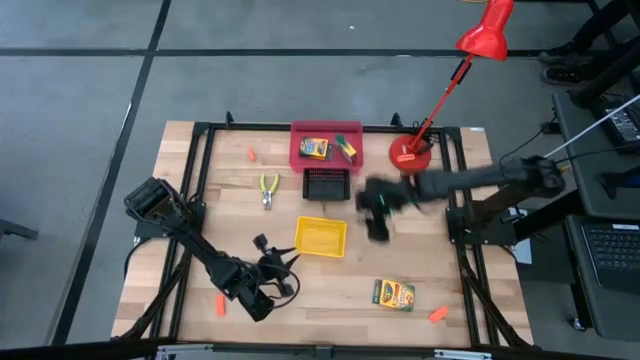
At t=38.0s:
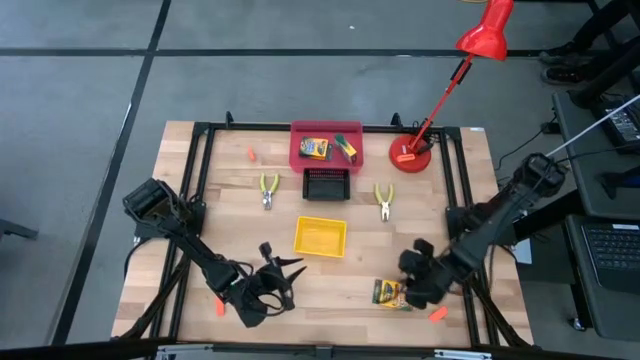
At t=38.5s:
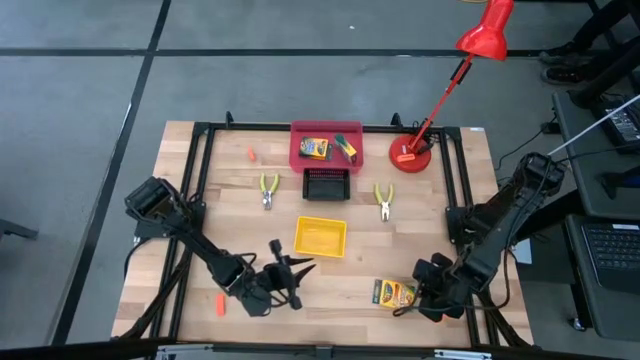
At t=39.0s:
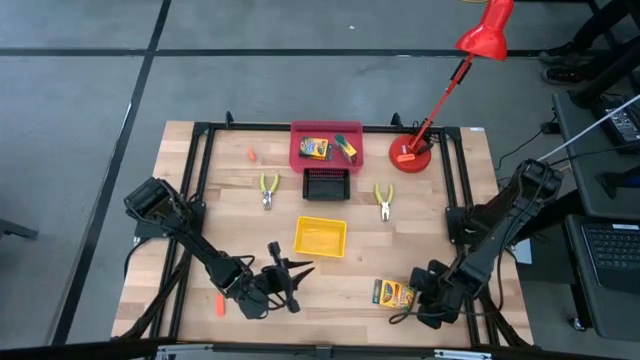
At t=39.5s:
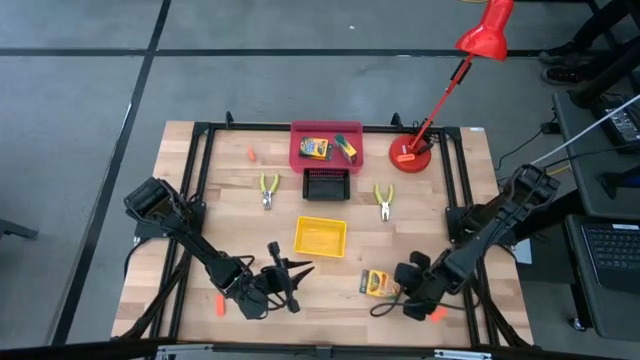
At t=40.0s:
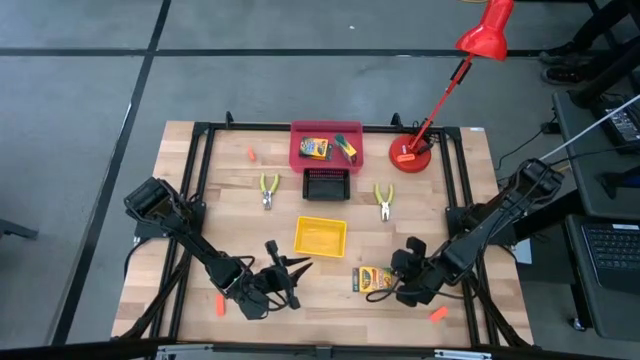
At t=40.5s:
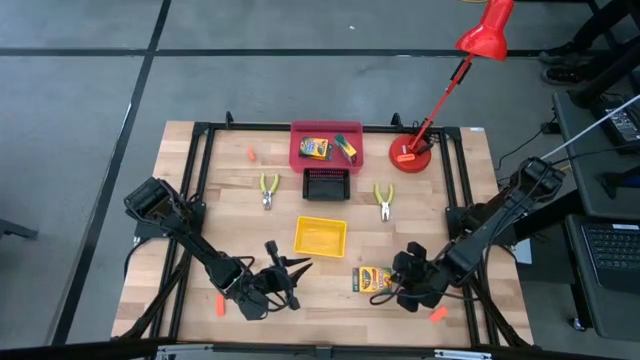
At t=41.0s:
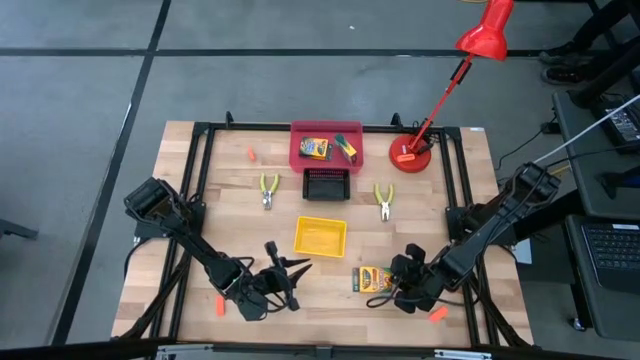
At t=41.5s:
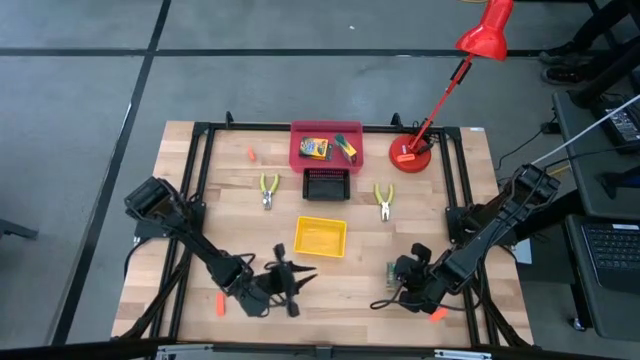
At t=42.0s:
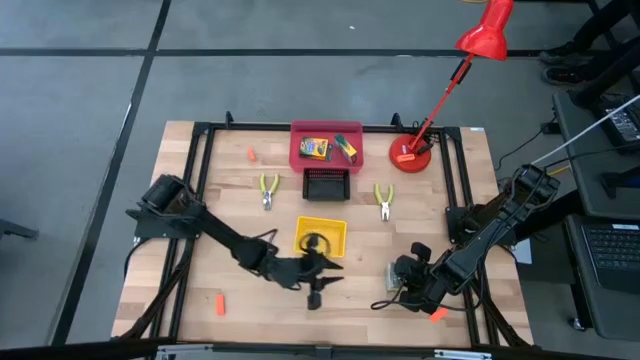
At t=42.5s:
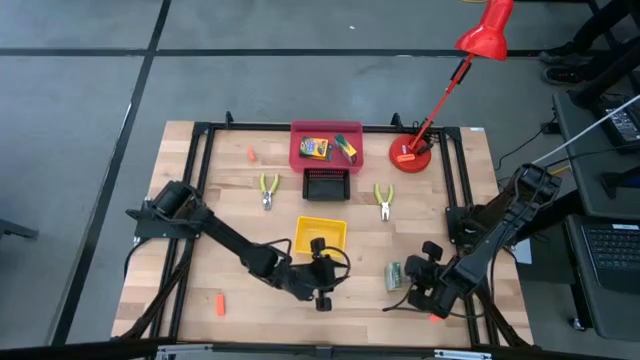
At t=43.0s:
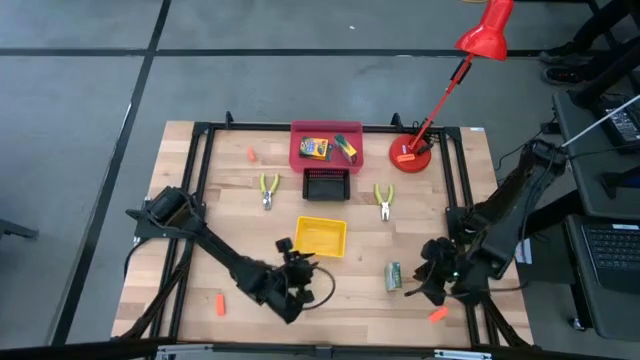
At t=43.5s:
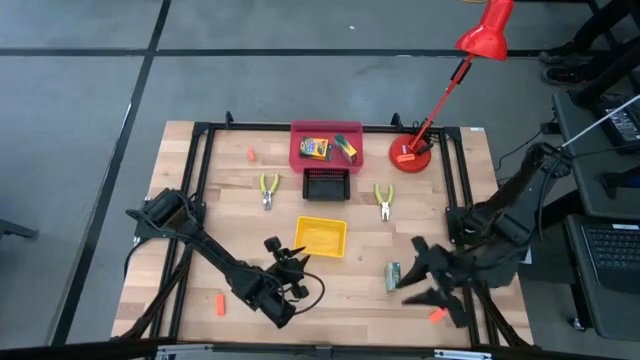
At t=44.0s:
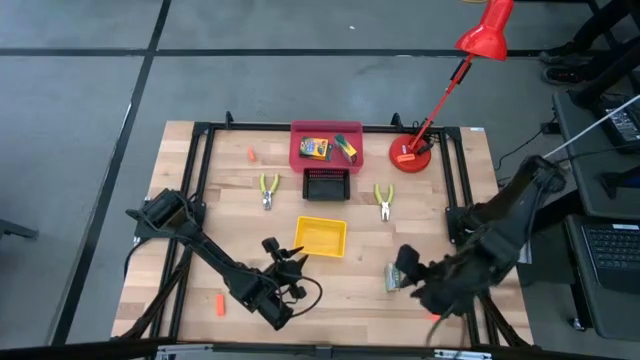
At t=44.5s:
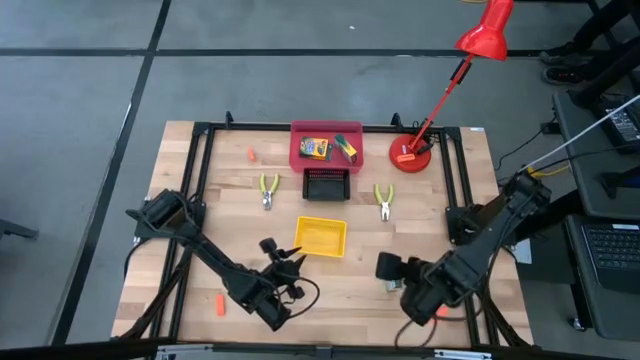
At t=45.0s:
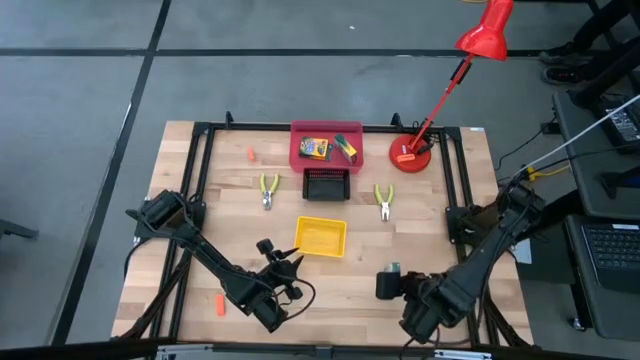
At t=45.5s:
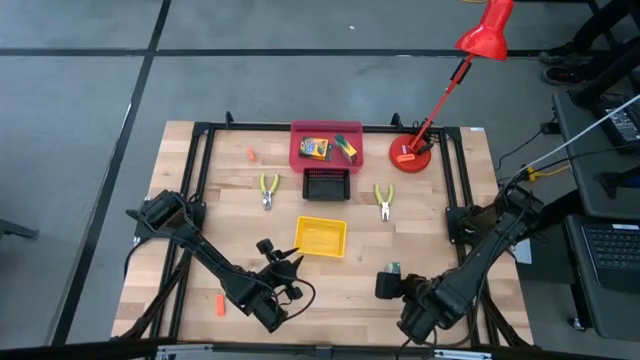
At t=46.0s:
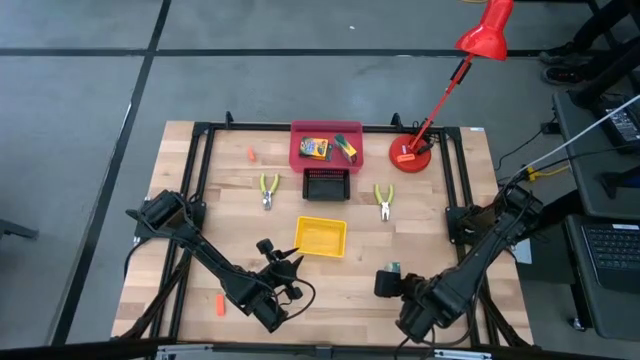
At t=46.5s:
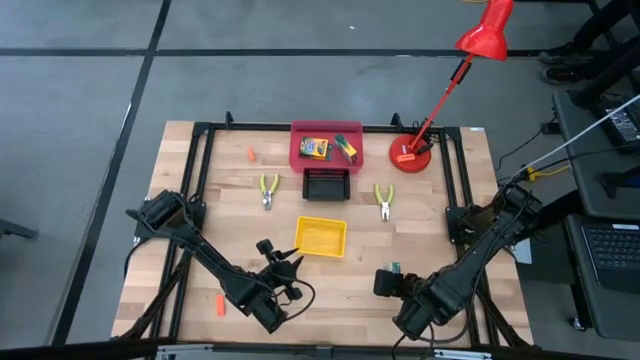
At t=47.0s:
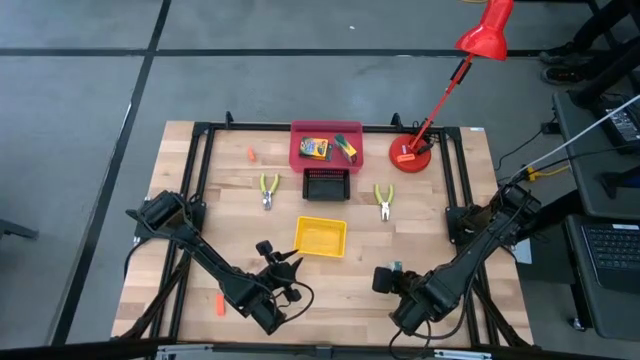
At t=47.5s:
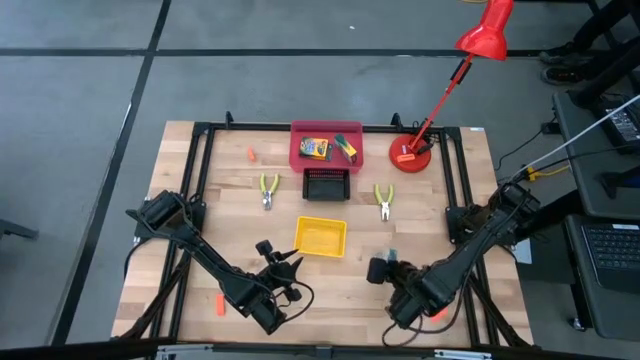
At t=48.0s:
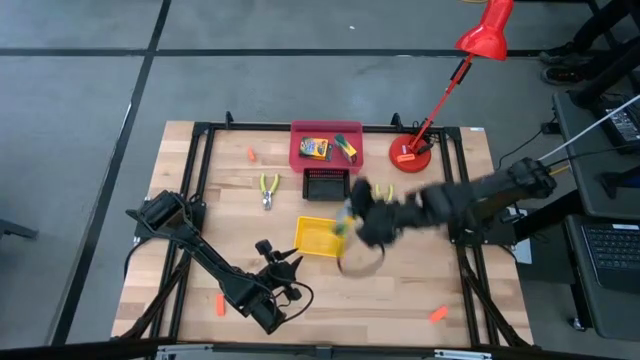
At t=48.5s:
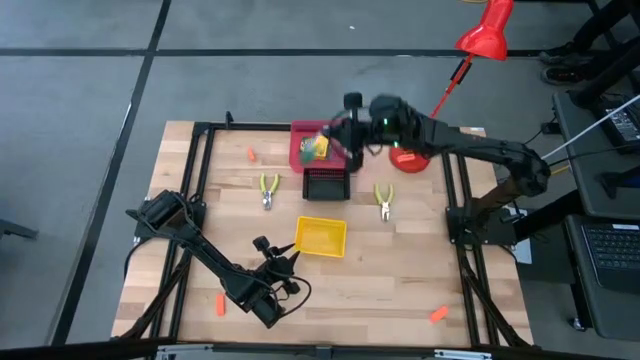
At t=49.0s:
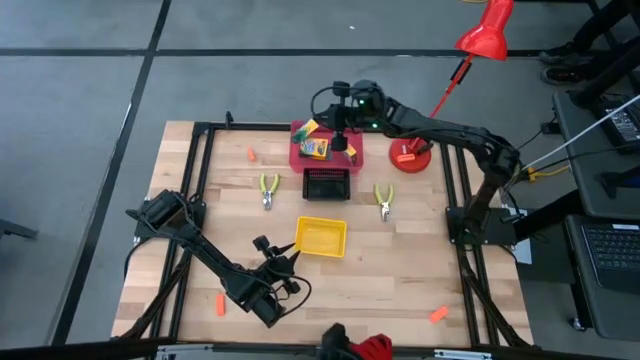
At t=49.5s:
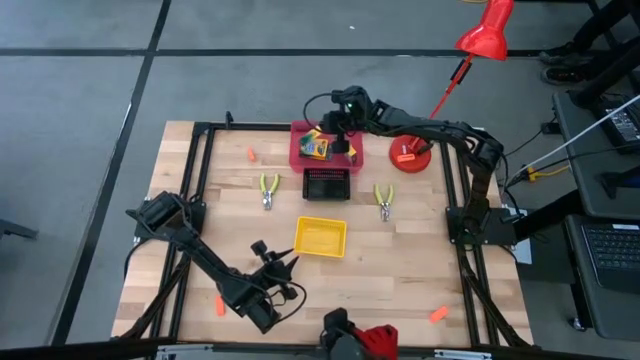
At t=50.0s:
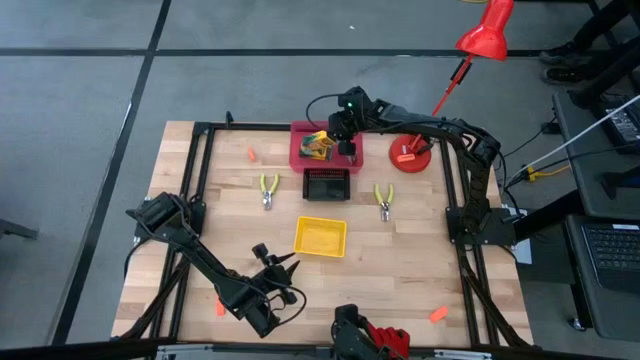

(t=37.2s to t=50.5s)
Task: Pick & Place School Supplies
Put the yellow crayon box into the red bin

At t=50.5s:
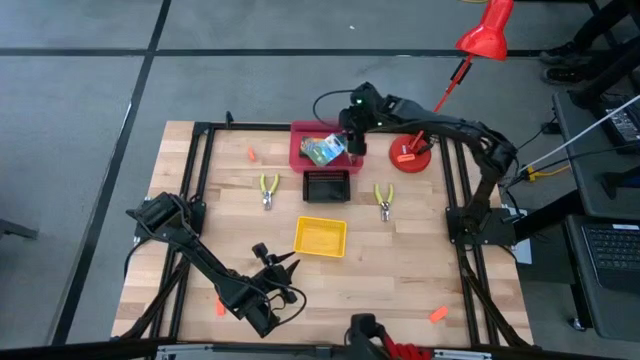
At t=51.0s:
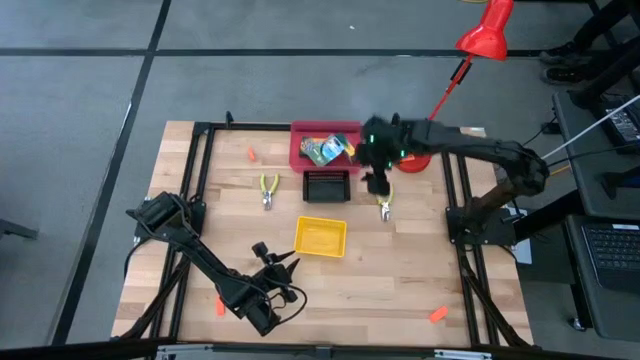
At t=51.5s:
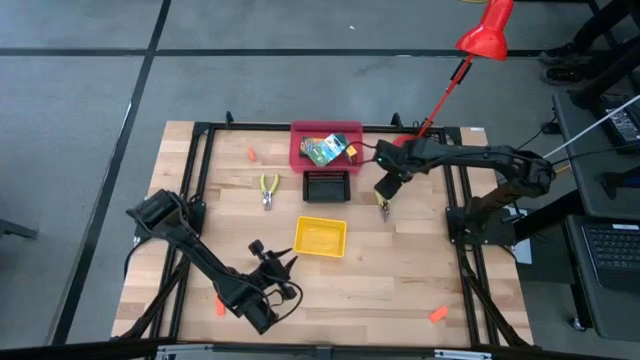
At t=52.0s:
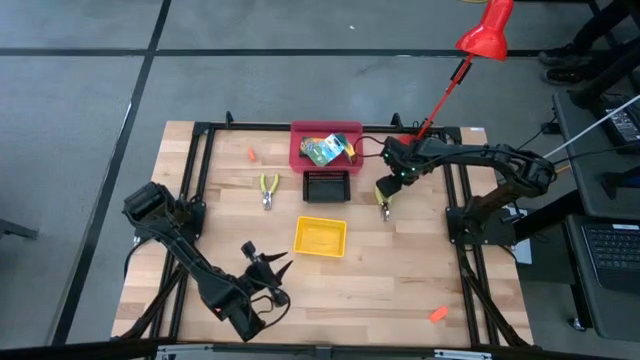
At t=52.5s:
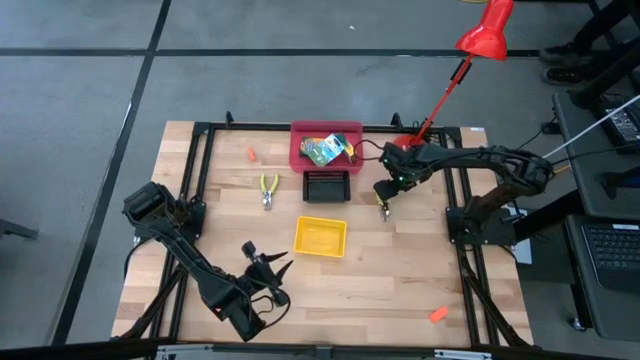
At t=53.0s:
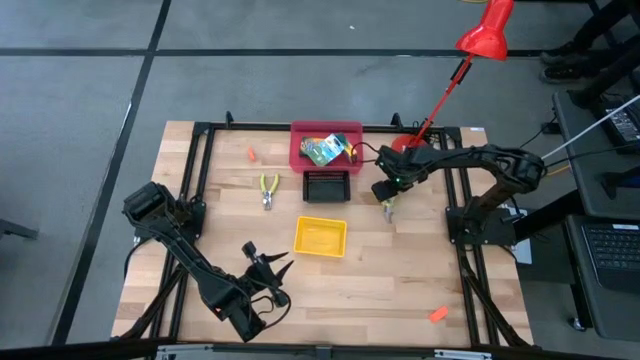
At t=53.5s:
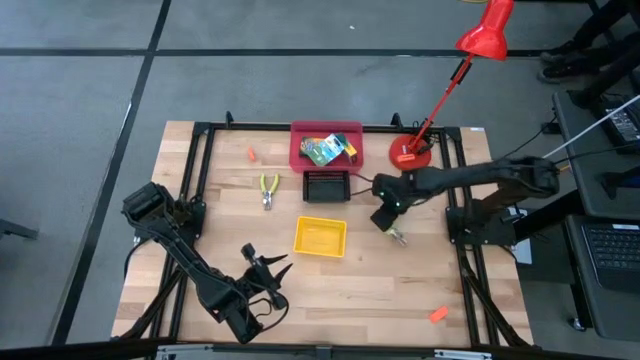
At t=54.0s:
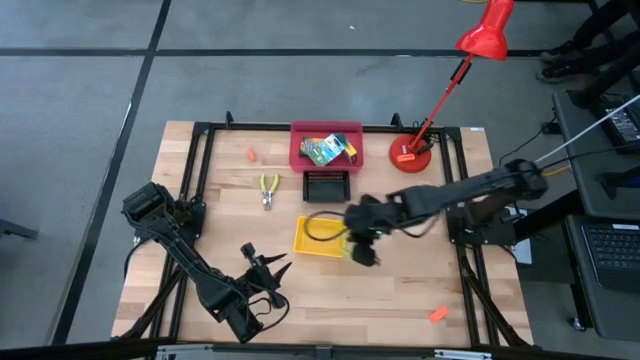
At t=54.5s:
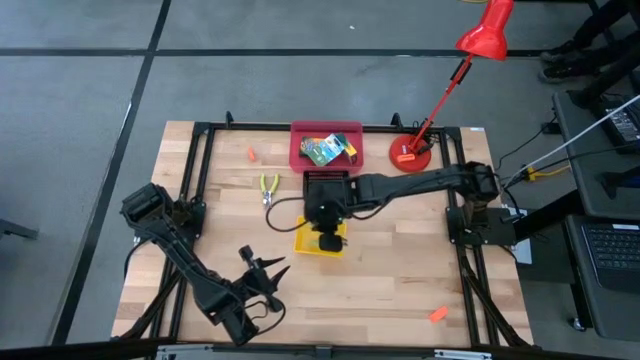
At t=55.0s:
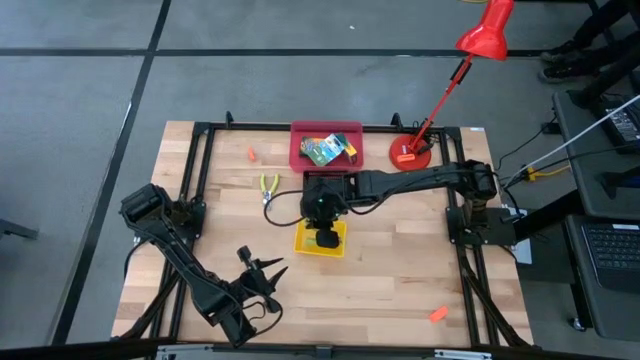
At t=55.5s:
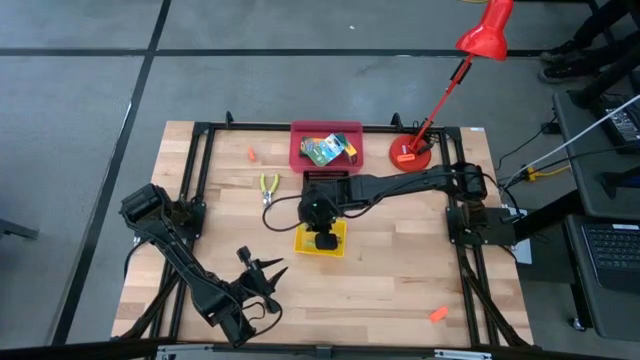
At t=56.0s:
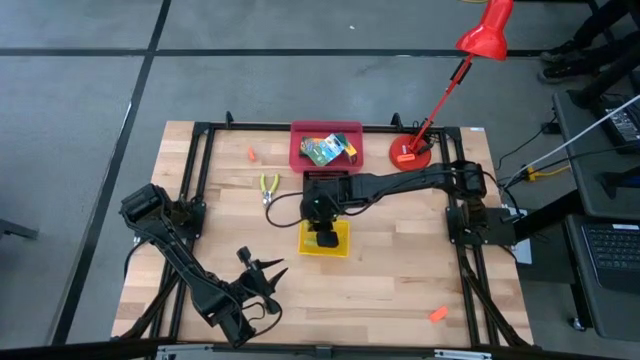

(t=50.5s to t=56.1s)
Put the green hole puncher into the yellow bin

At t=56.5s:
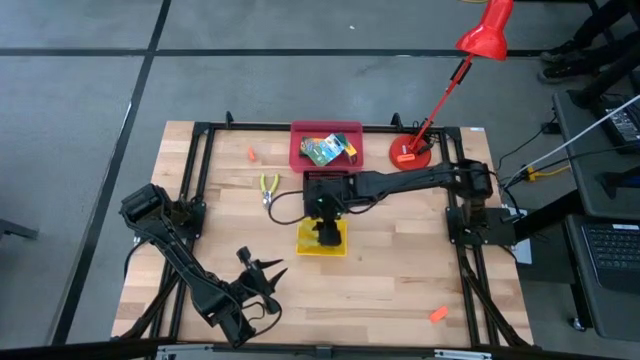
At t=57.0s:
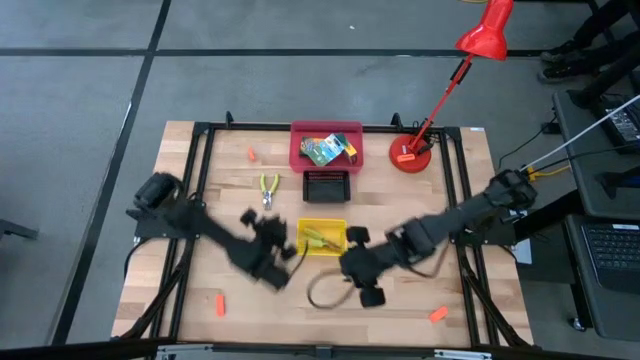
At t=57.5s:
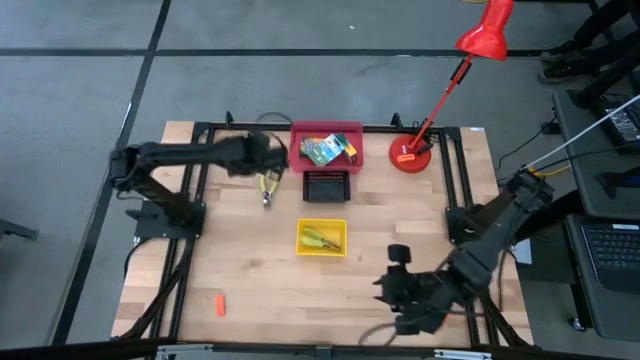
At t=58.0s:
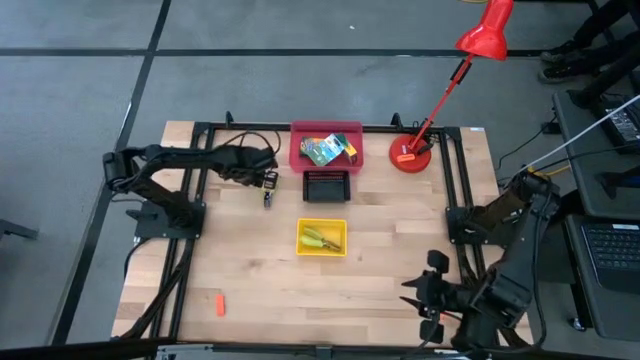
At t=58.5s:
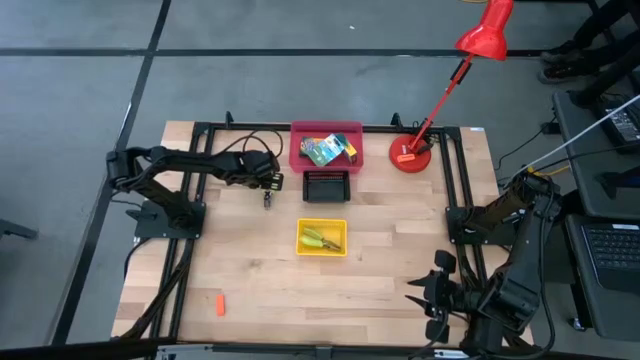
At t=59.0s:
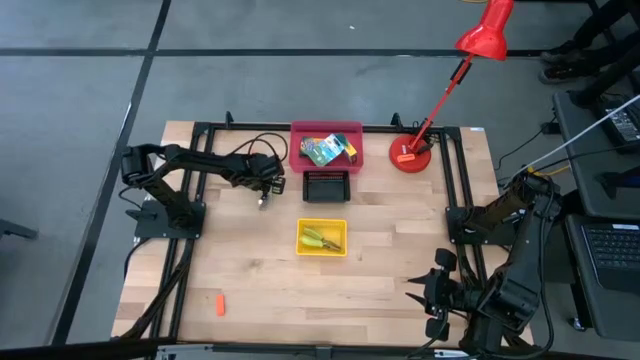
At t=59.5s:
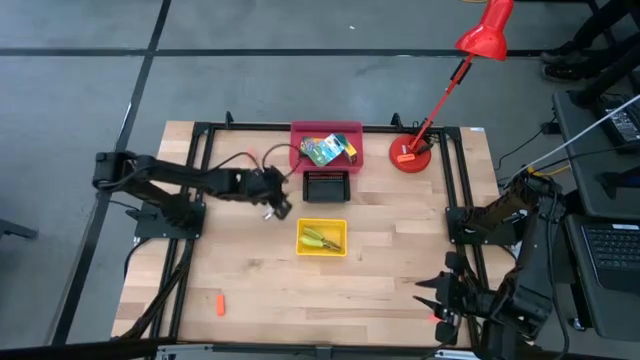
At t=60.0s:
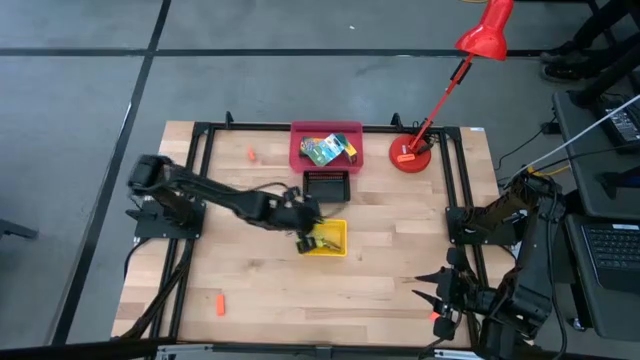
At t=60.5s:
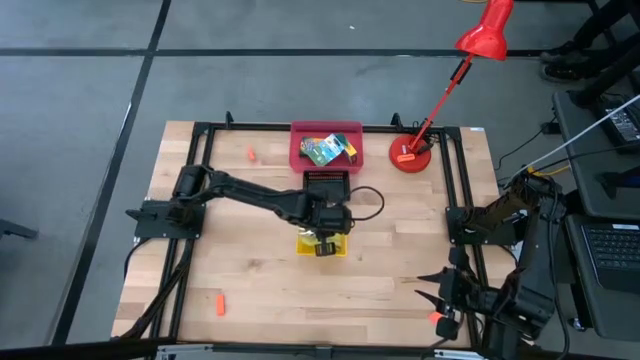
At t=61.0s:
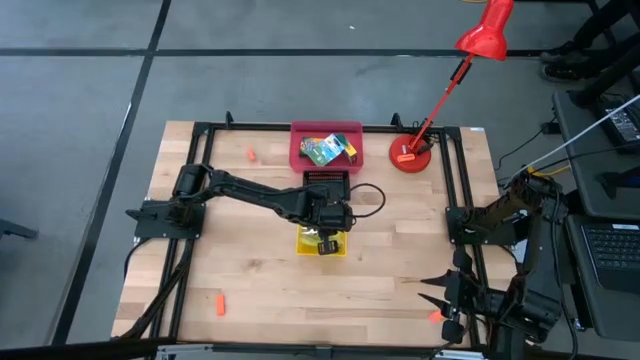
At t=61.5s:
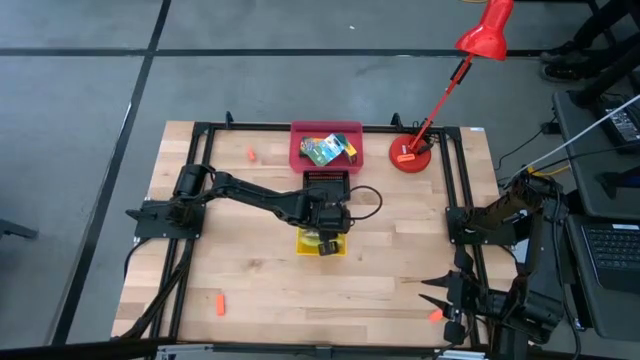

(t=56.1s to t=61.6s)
Put the green hole puncher into the yellow bin
